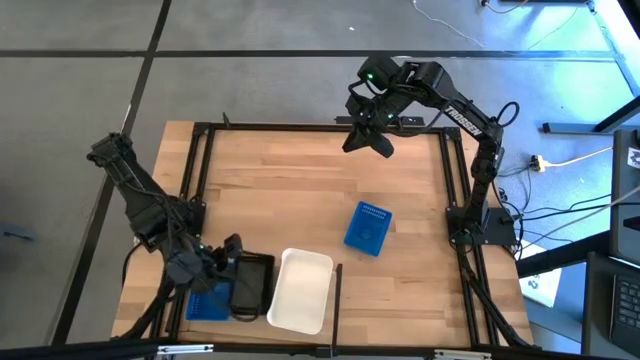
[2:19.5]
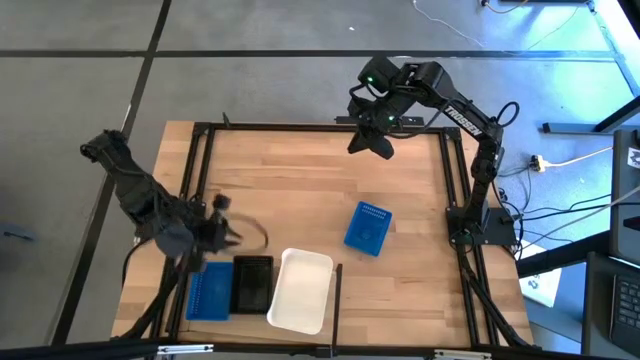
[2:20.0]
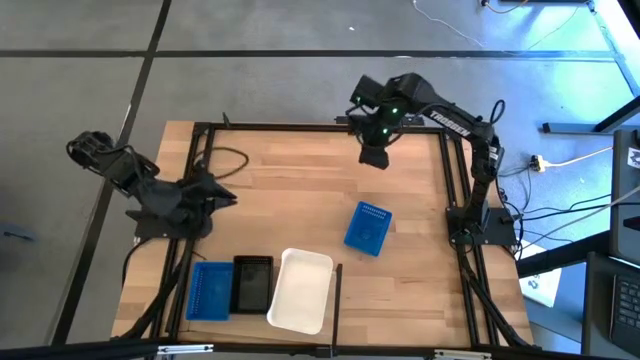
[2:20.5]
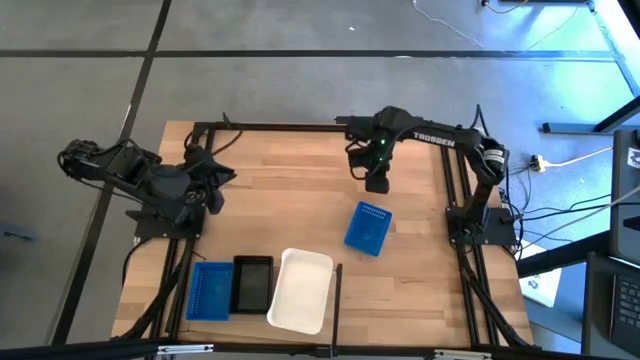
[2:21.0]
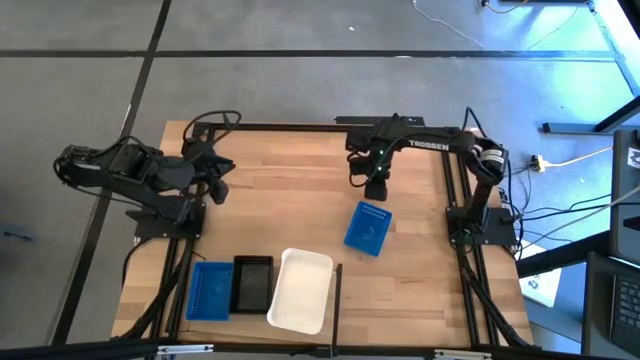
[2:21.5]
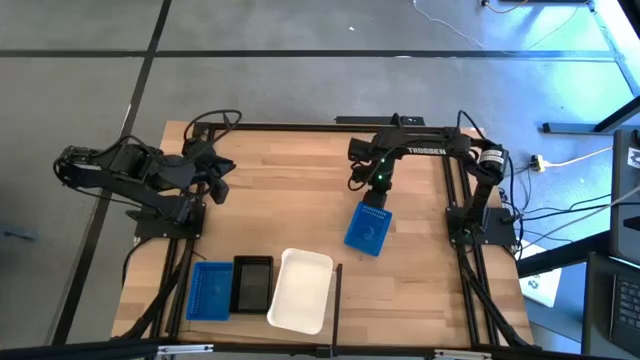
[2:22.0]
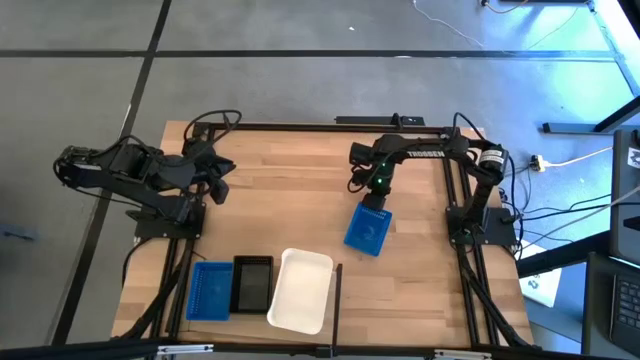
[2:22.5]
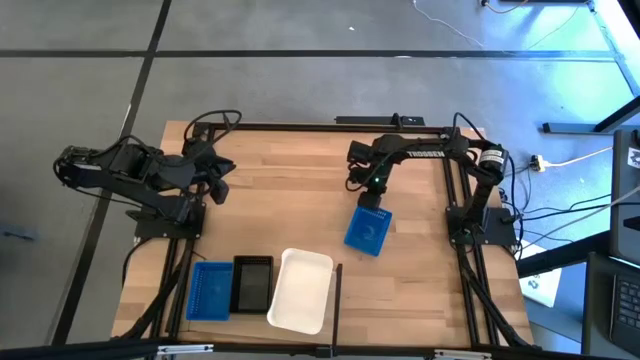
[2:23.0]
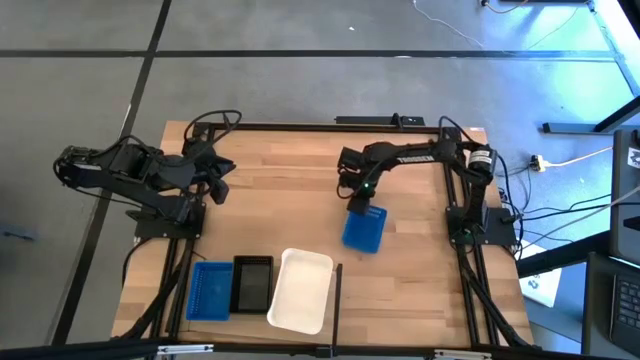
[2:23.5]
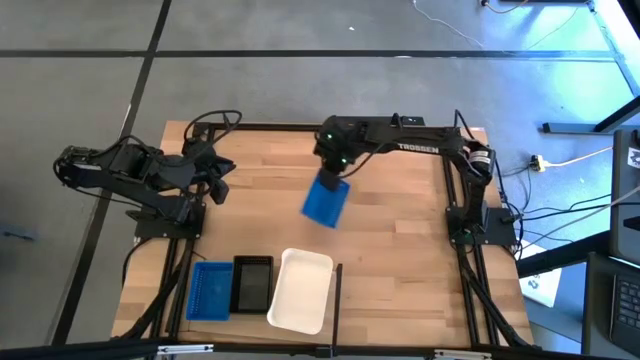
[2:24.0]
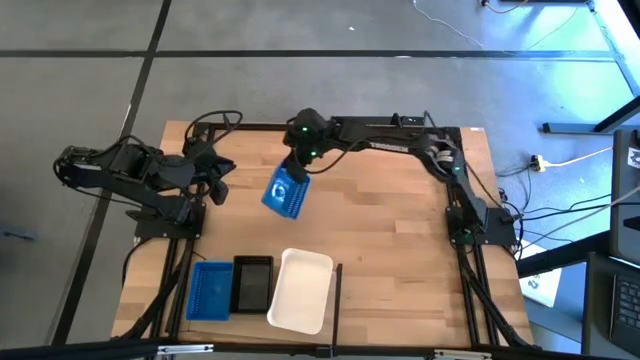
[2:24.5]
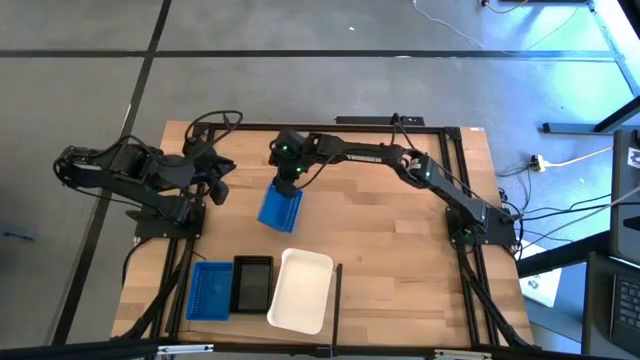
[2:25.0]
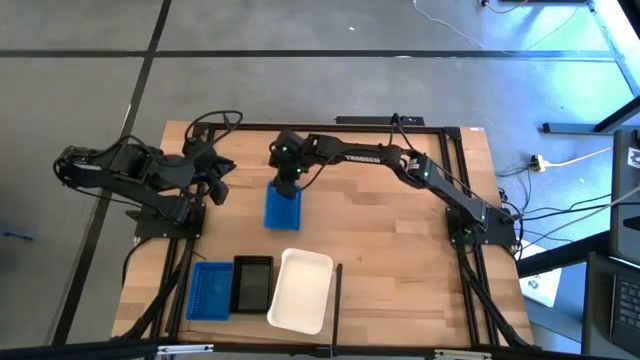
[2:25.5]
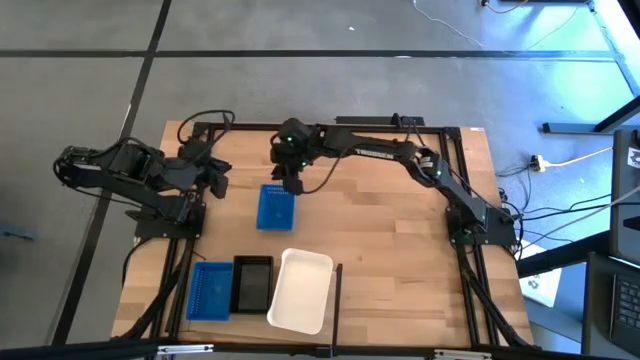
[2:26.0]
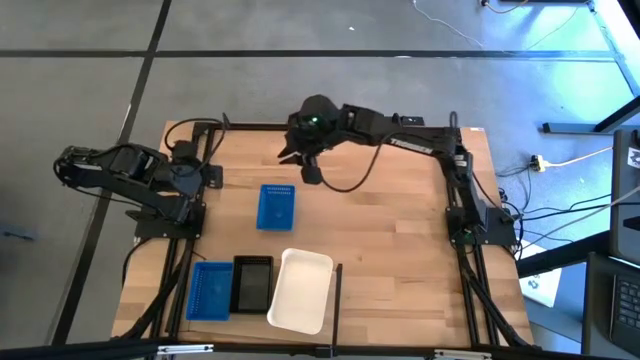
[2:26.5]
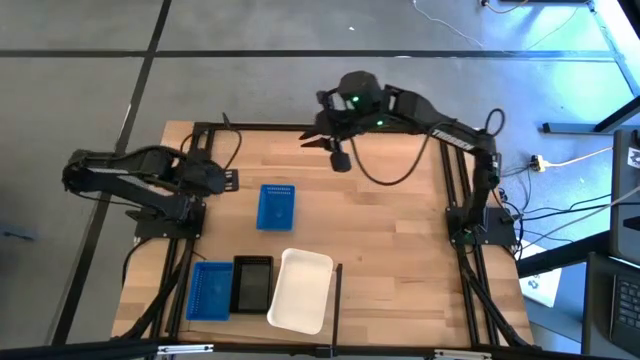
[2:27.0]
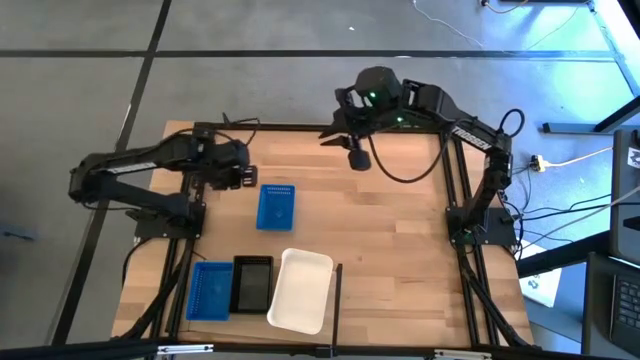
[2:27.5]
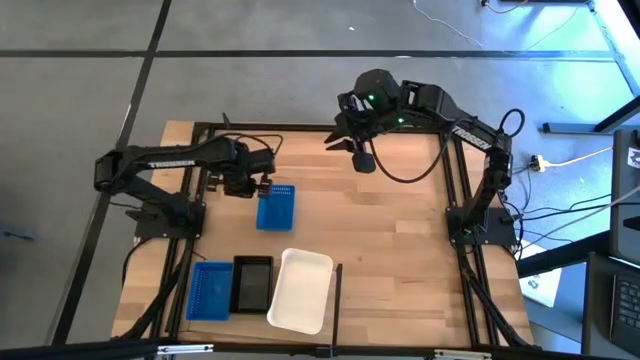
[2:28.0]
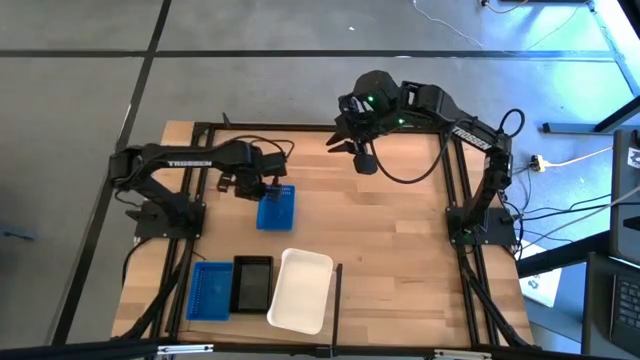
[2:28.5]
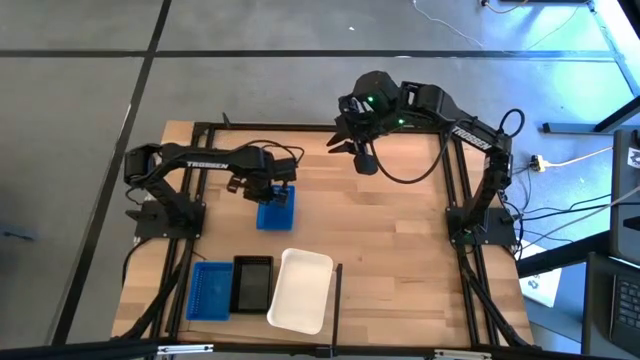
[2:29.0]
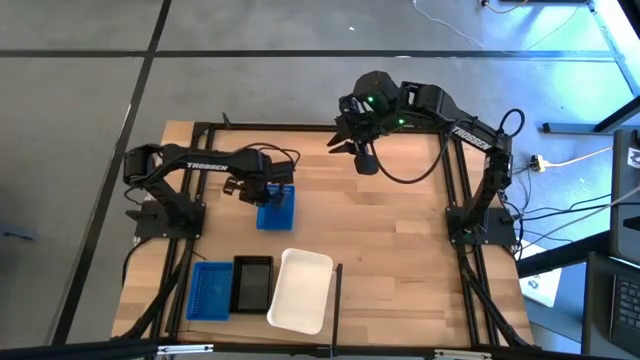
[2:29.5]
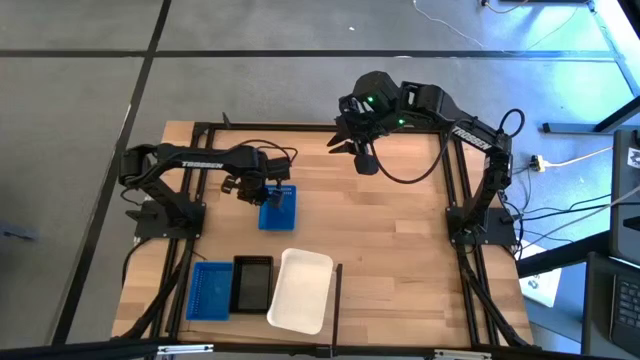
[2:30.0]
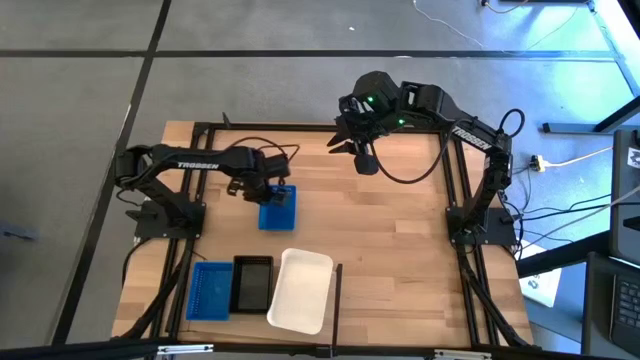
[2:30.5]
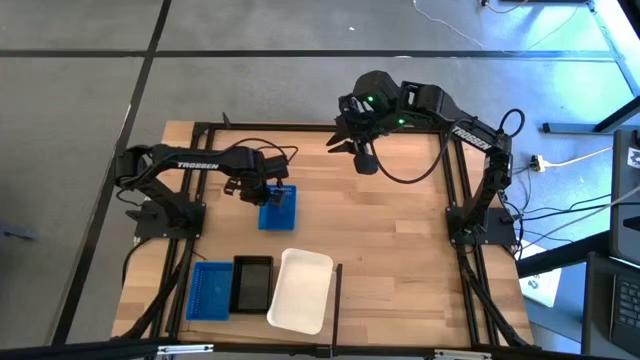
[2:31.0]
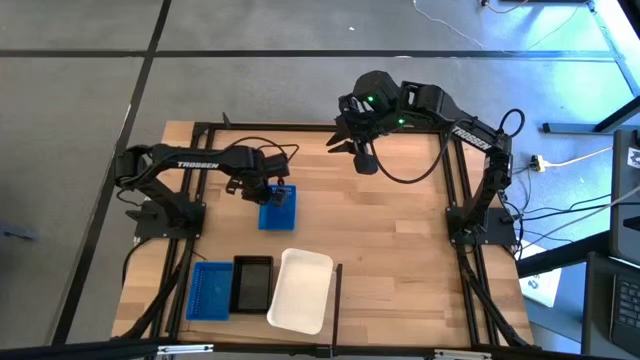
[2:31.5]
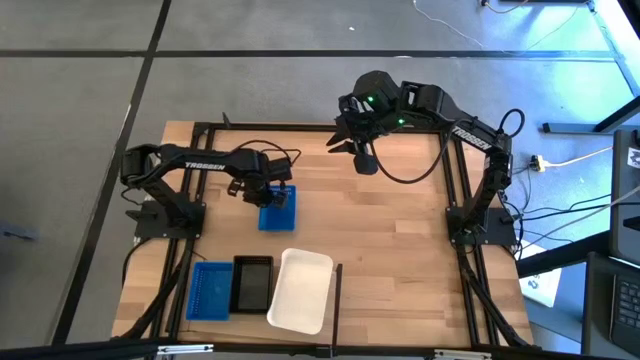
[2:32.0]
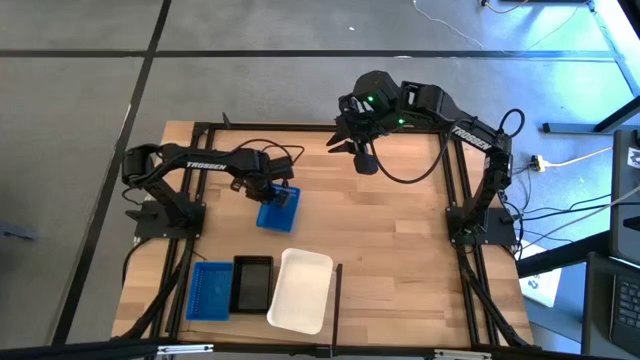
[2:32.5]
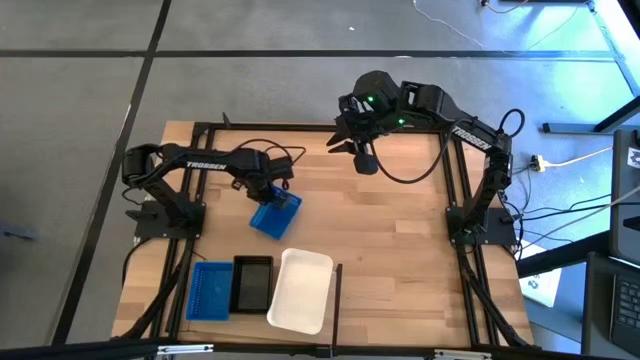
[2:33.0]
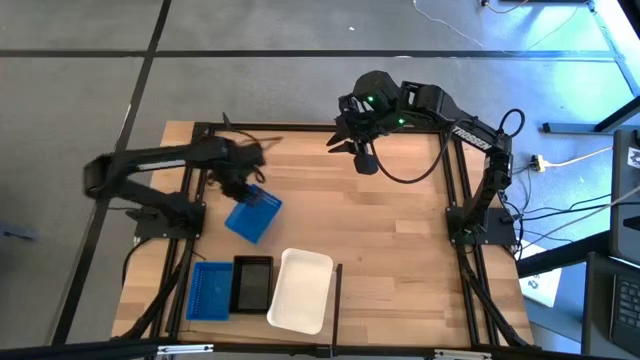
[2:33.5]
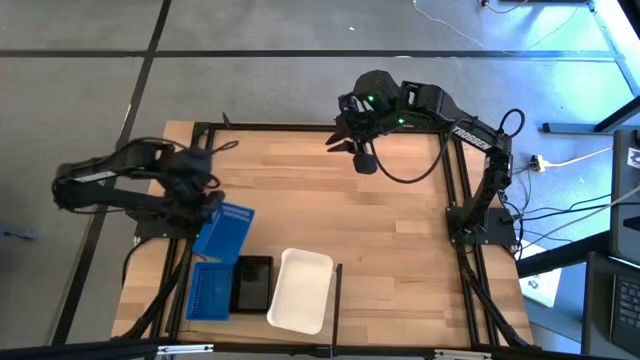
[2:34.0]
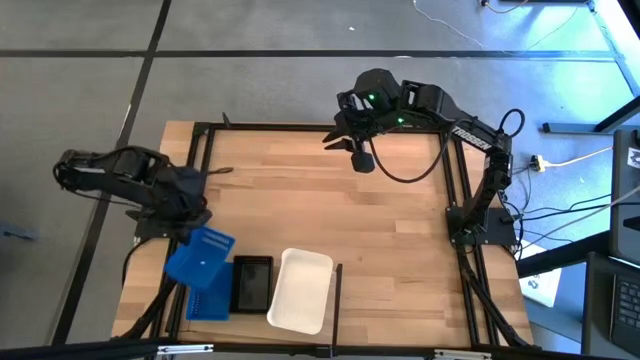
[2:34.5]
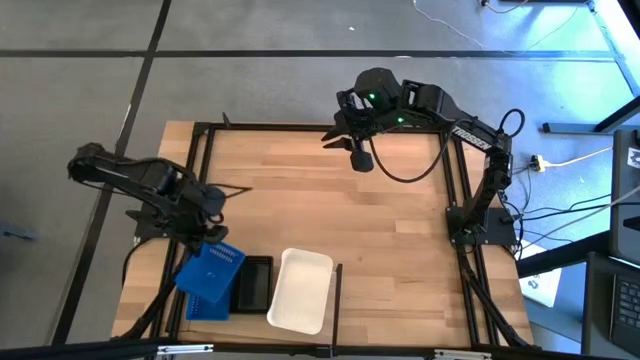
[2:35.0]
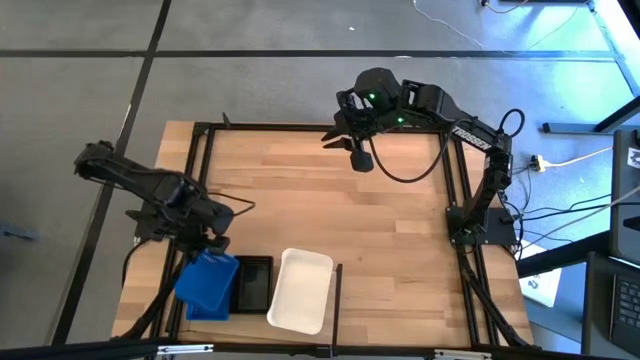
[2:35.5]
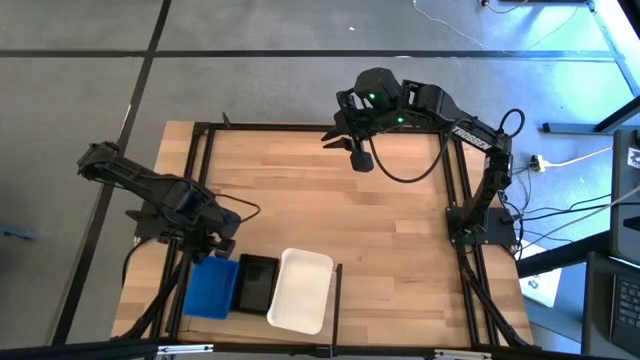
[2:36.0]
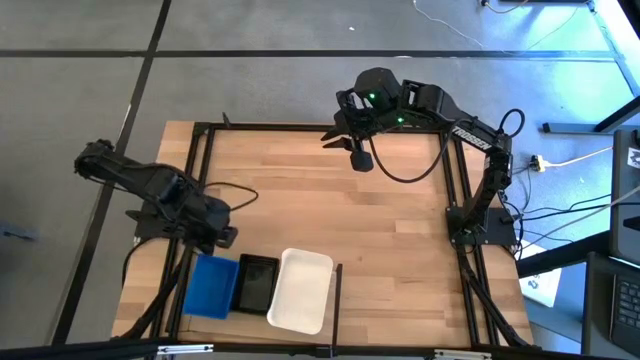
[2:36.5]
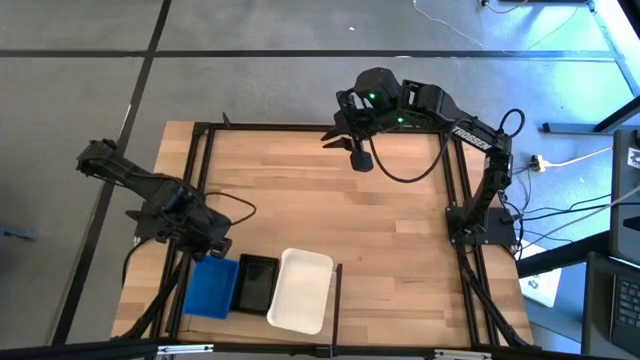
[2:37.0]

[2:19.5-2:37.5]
Task: Stack baskets on shelf by color
Stack the blue bin on top of the blue bins on the shelf

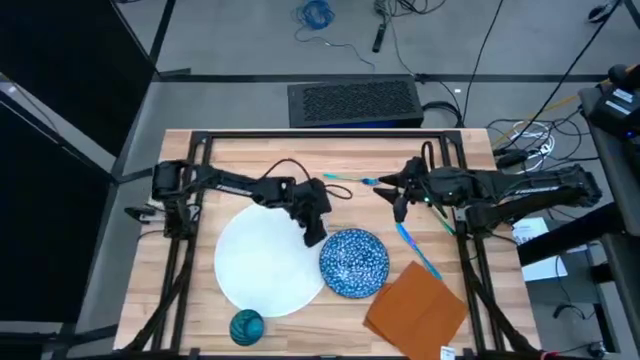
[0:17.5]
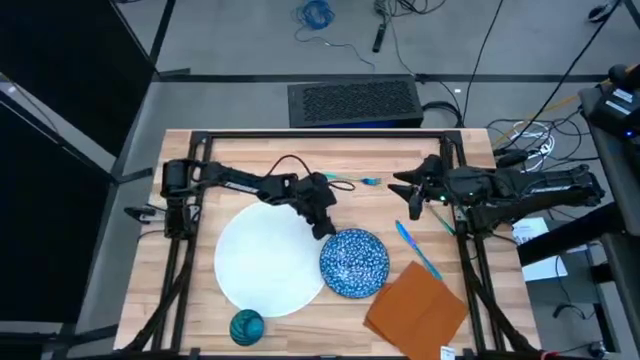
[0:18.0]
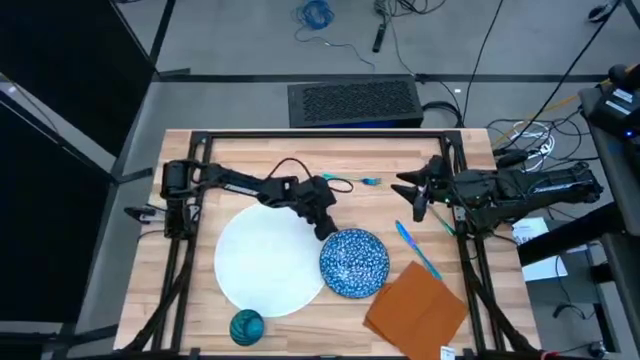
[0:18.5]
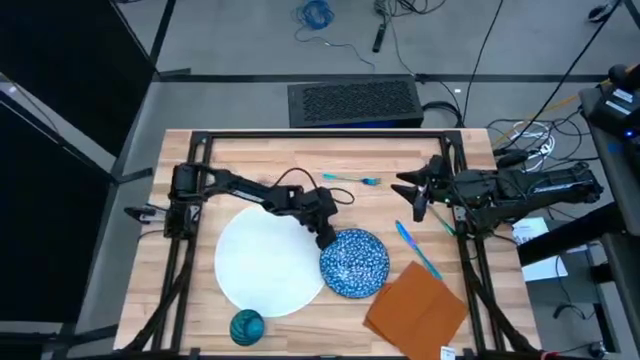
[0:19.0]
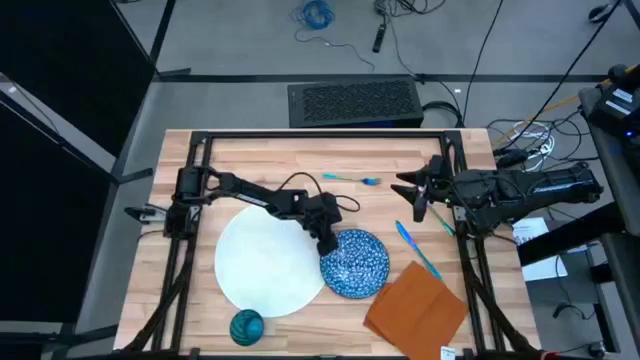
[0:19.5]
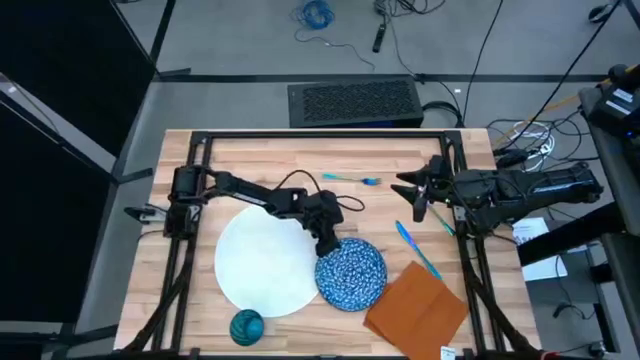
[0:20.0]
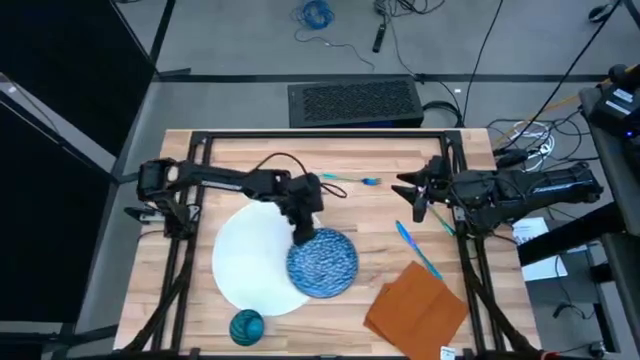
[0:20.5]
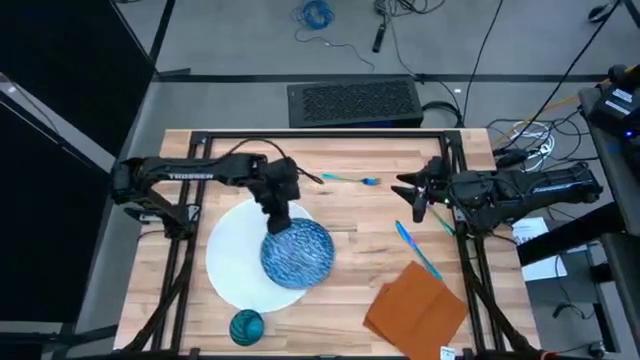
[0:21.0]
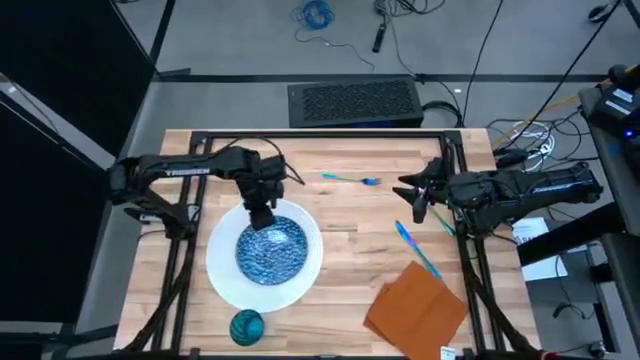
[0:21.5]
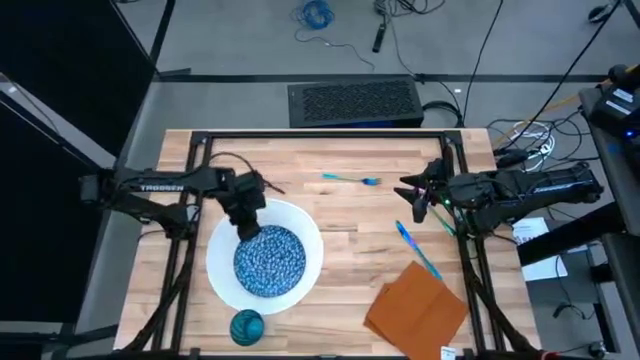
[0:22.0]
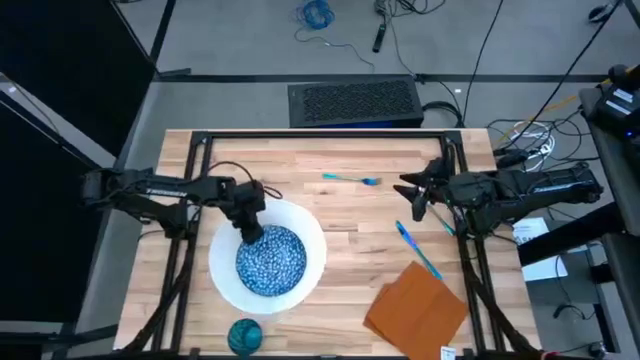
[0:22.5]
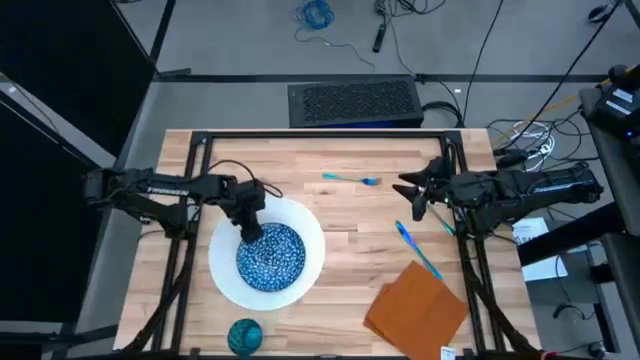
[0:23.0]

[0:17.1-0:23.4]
Task: Set table place
Stack the blue plate on the top of the white tablemat
